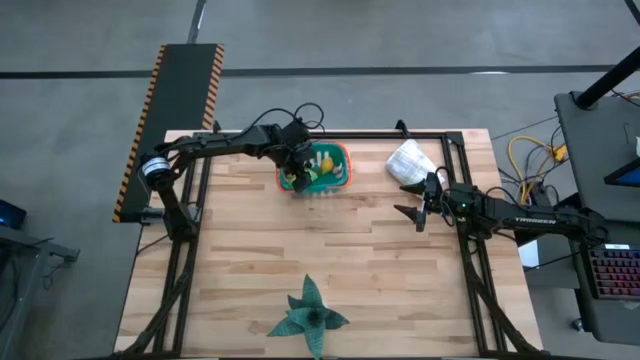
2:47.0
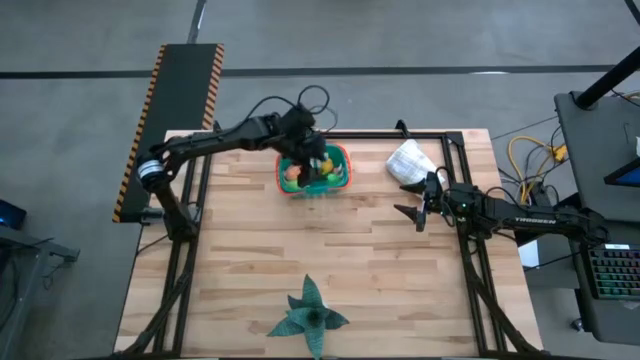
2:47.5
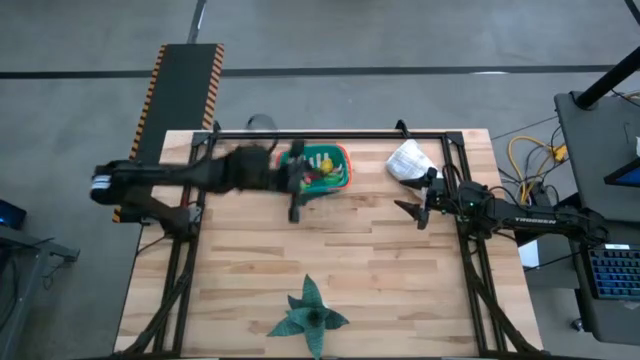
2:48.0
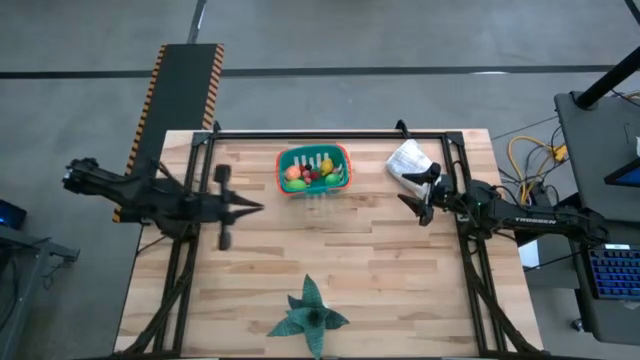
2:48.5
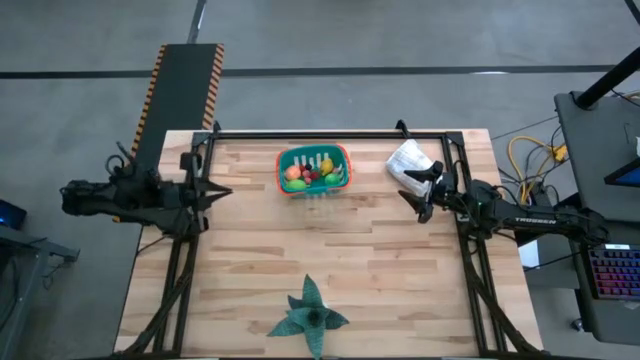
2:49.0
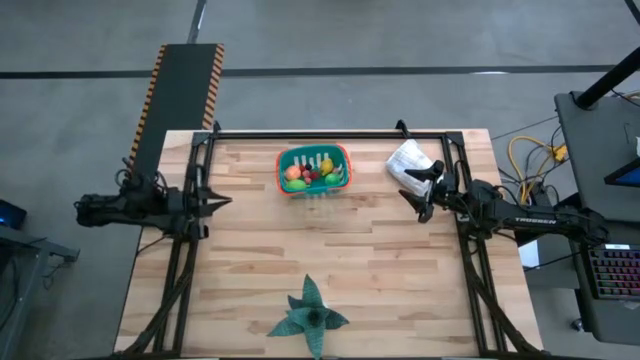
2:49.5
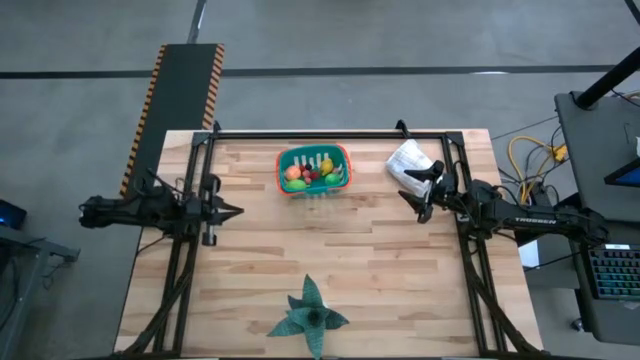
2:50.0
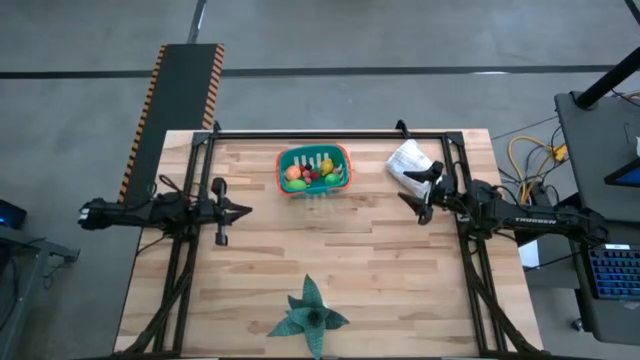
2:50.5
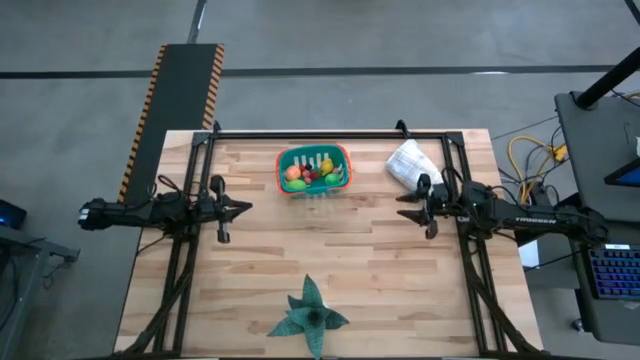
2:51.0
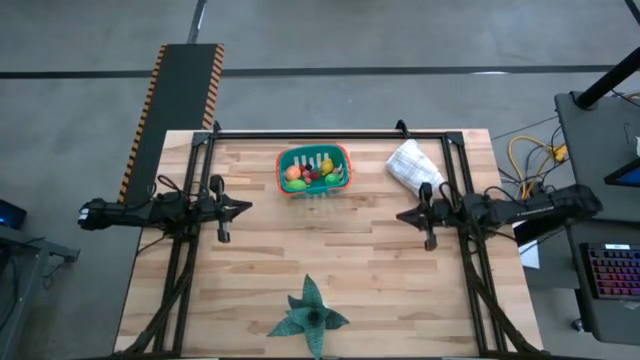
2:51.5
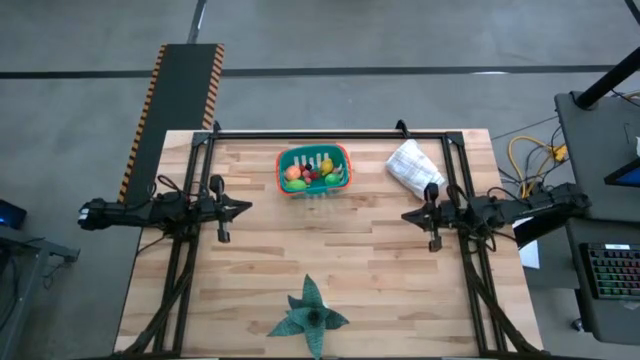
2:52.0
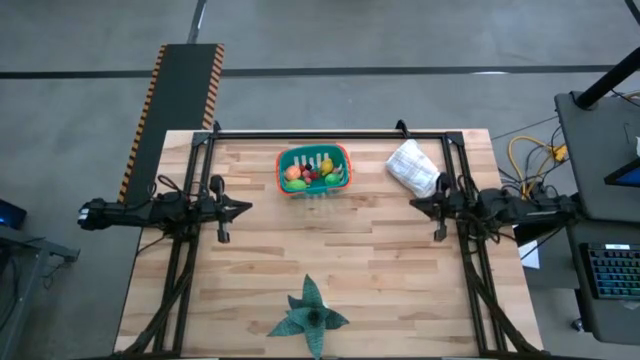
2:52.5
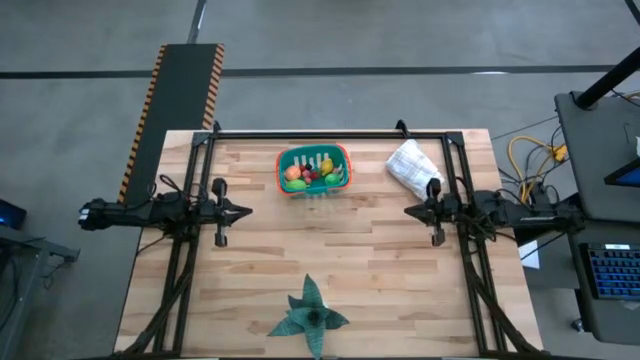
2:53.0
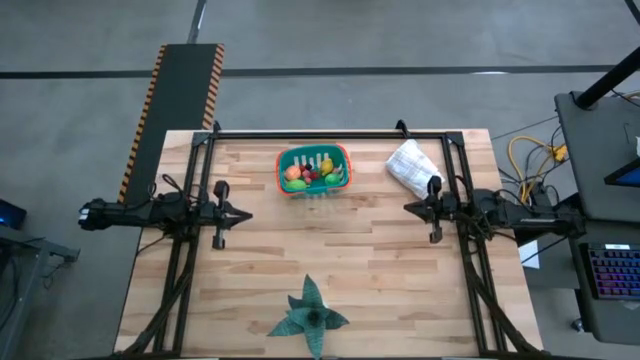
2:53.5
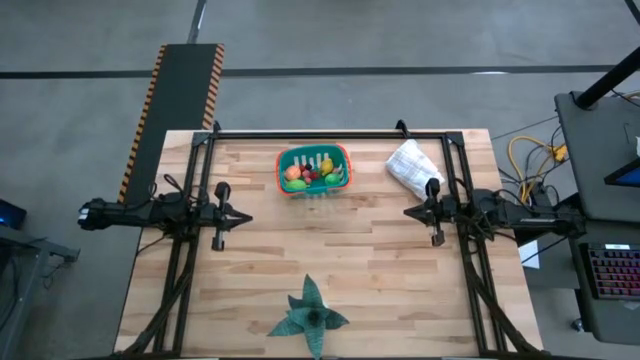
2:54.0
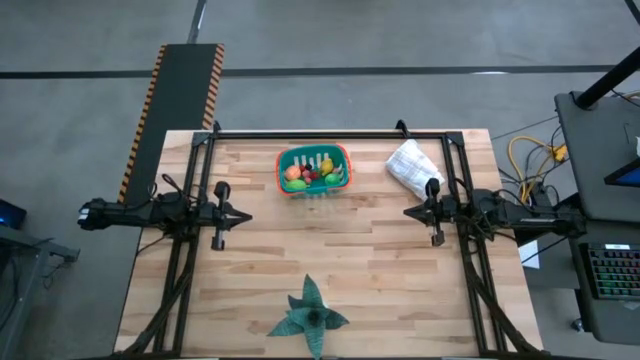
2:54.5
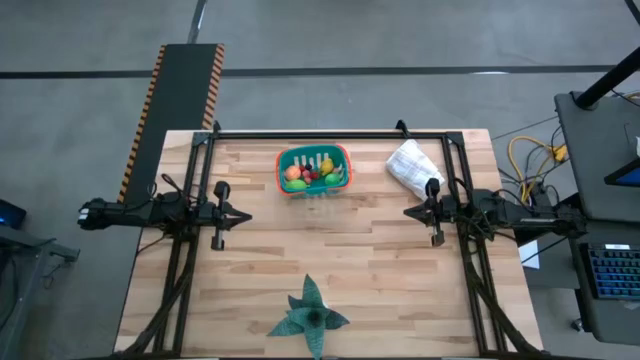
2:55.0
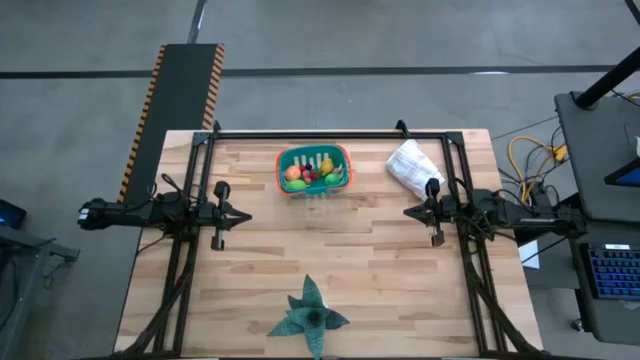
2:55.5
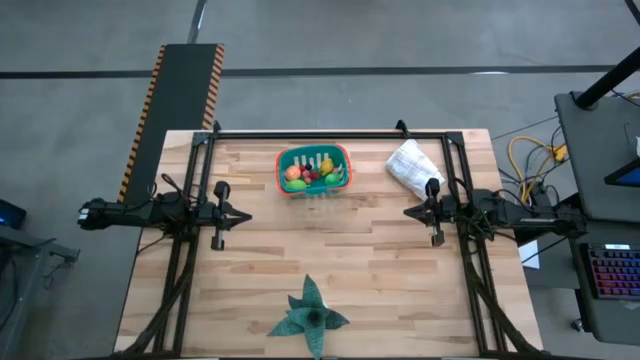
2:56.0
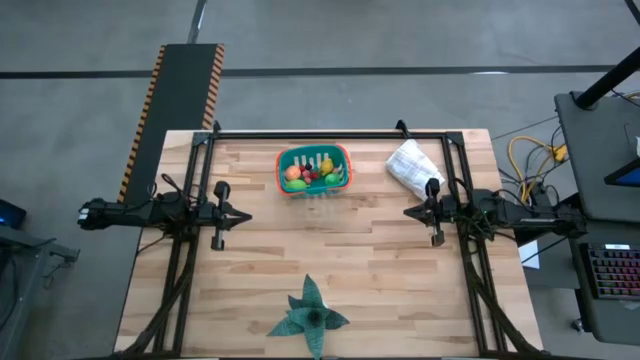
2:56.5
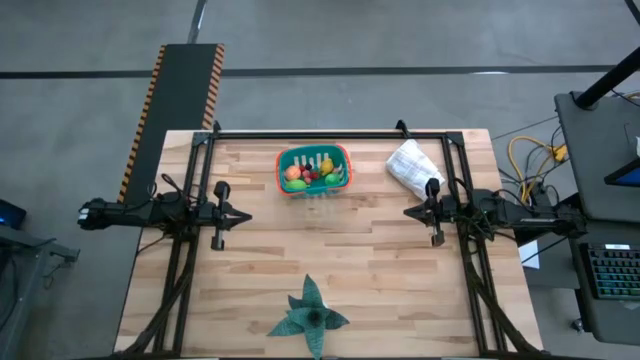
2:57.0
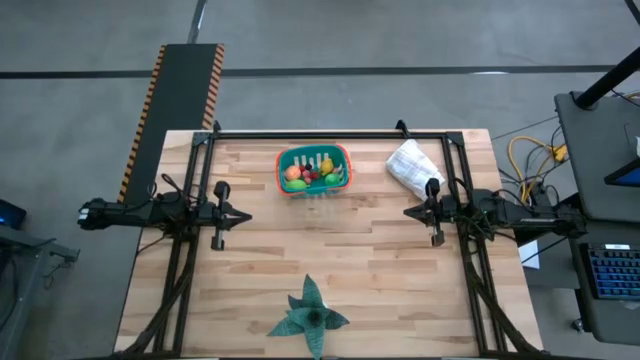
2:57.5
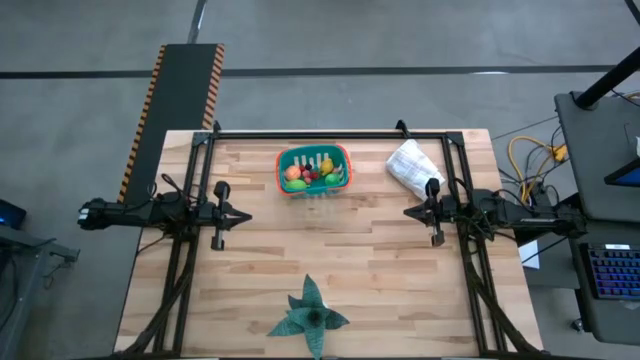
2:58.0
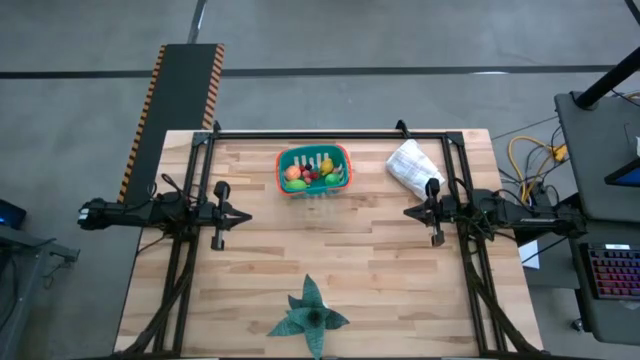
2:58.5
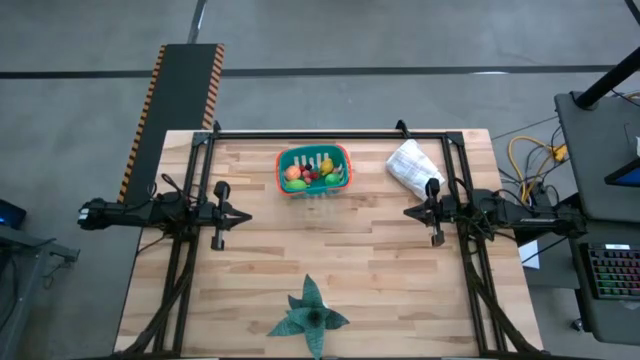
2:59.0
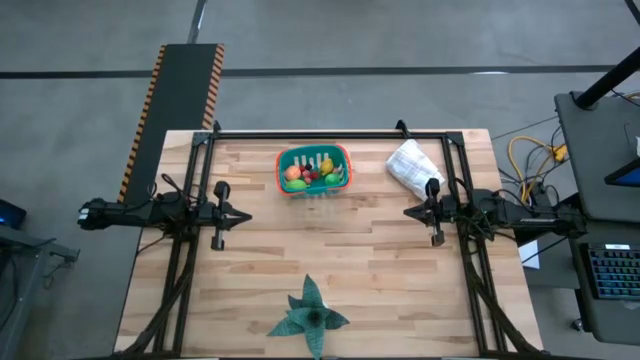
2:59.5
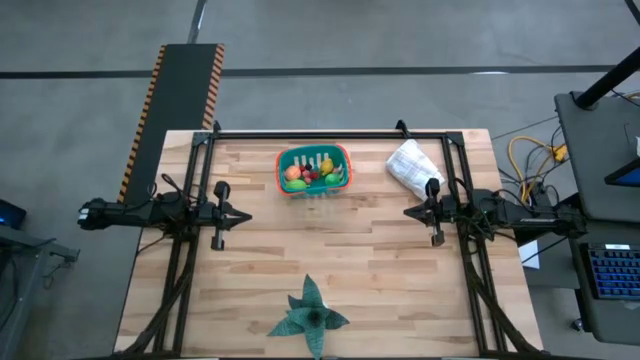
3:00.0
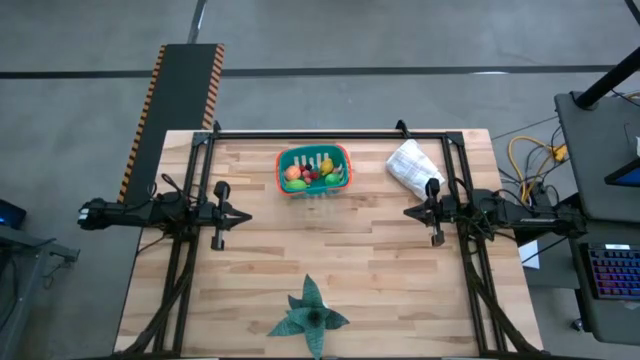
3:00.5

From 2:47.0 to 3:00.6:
Task: Pick and placing Produce into tupperware
Return to Home Position

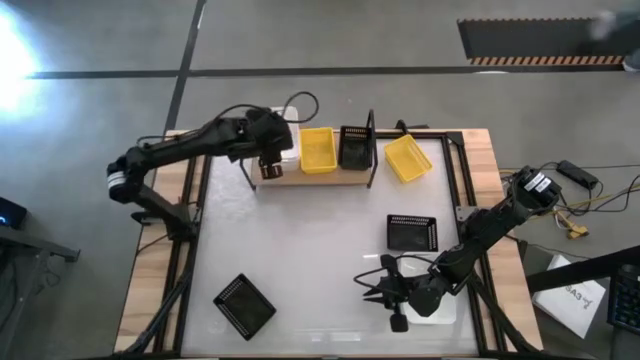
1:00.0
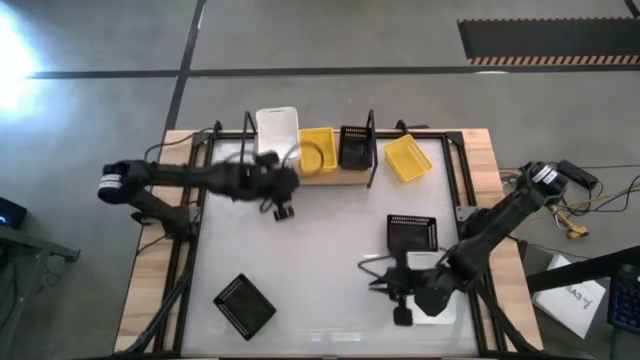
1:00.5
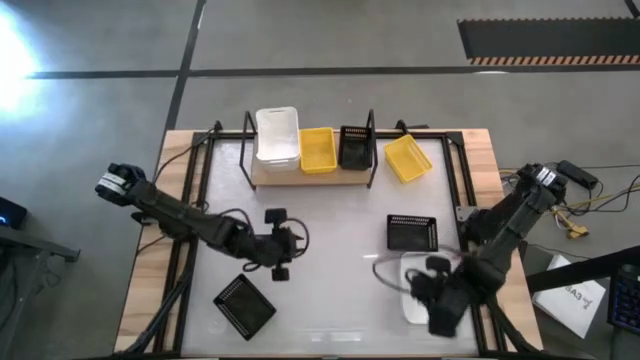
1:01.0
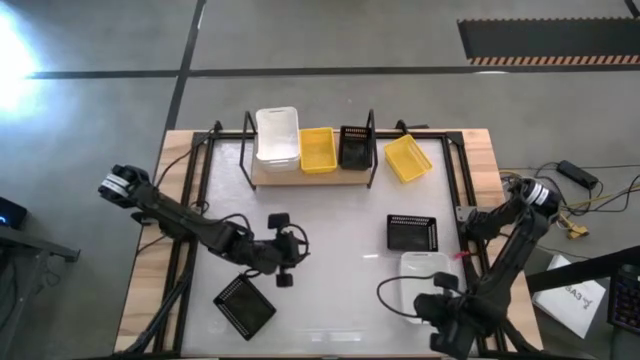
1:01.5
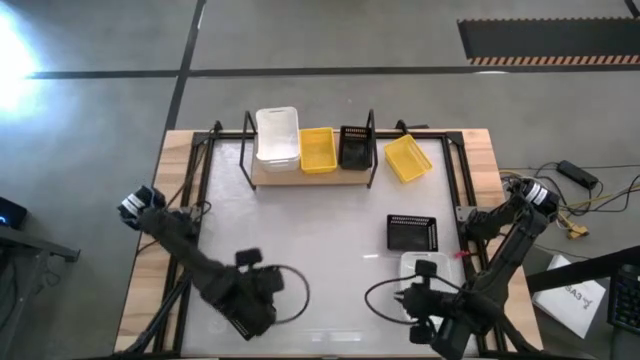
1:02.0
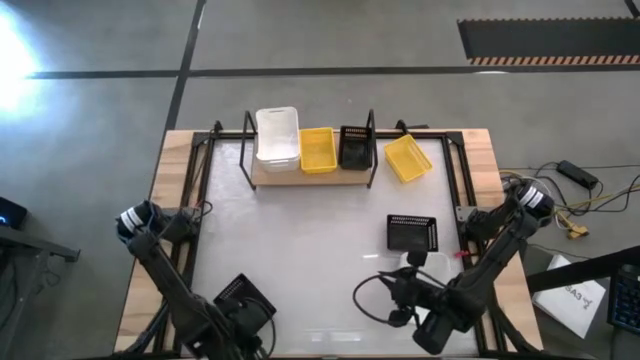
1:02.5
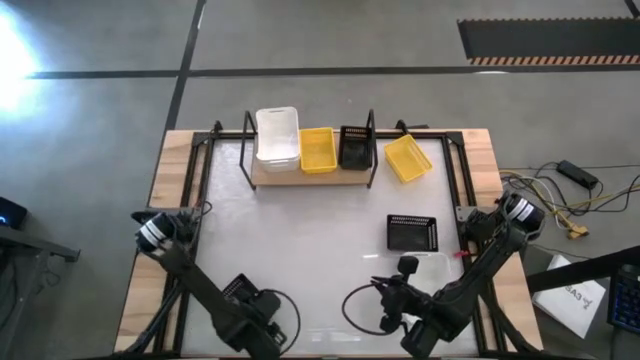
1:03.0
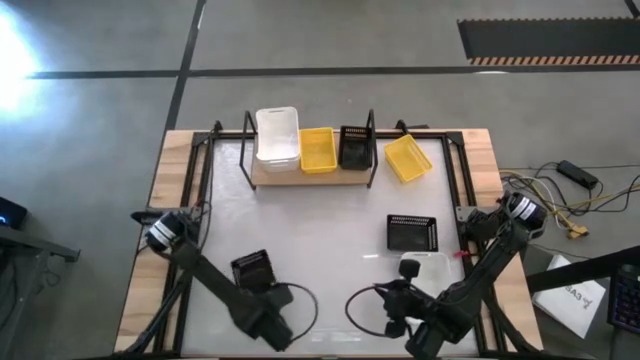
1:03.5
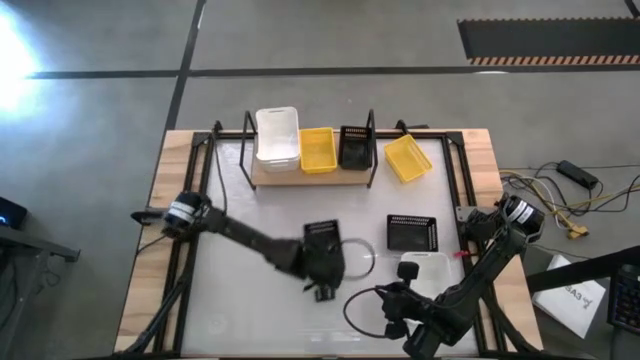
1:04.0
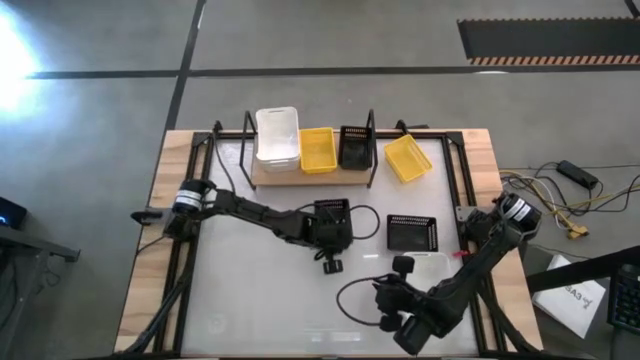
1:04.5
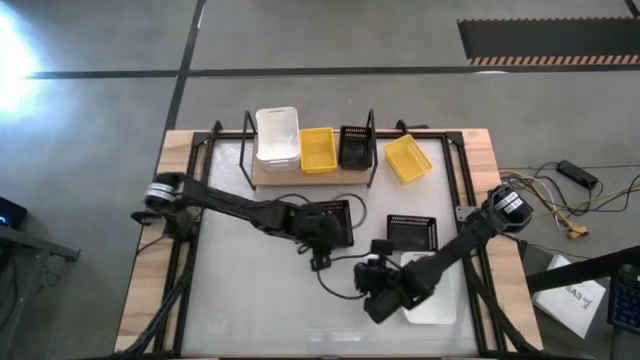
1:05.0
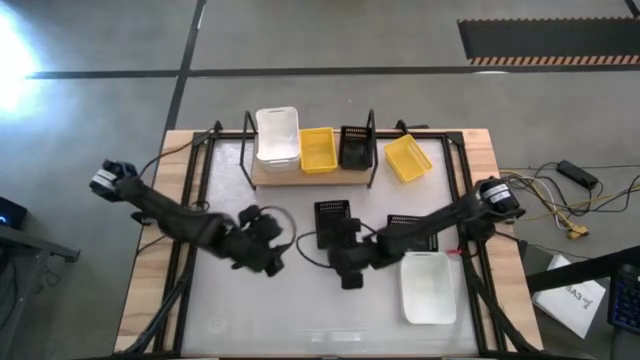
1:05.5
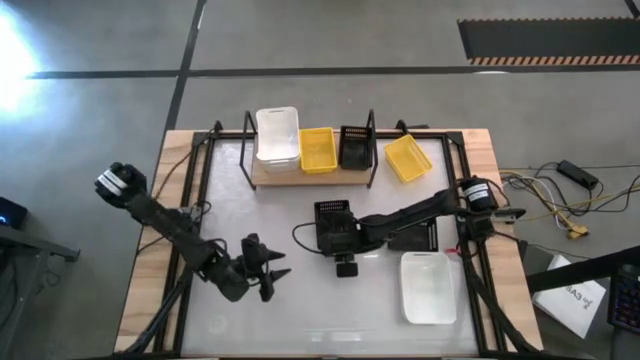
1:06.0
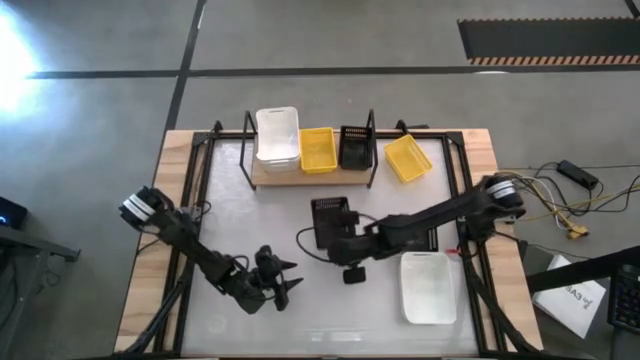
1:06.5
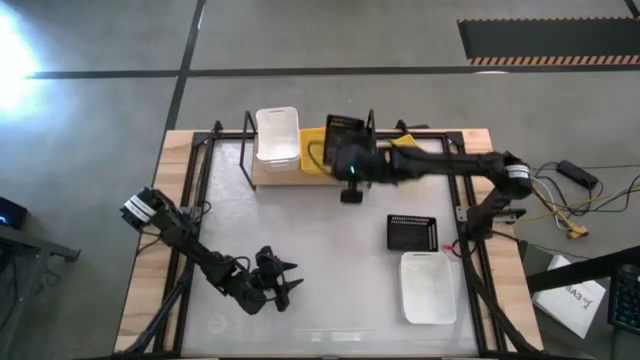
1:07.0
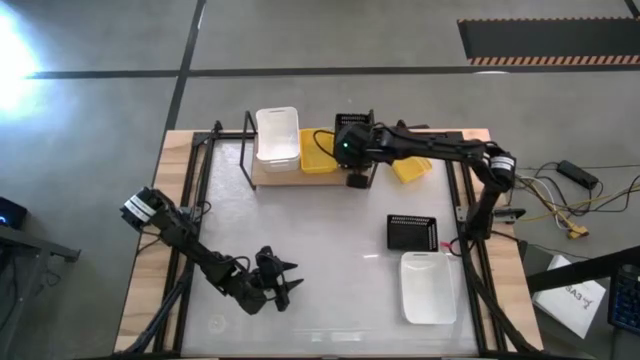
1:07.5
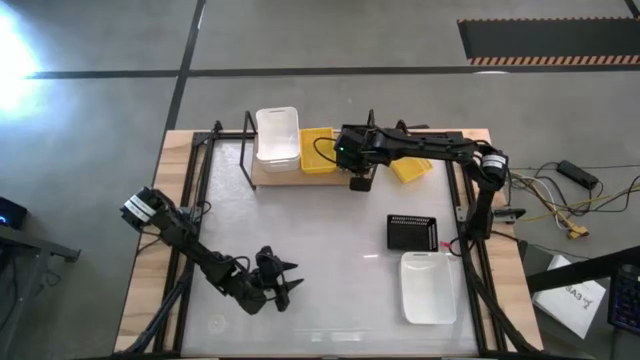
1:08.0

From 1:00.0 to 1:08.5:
Task: Stack baskets on shelf by color
Stack the bottom black bin on top of the black bin on the shelf
